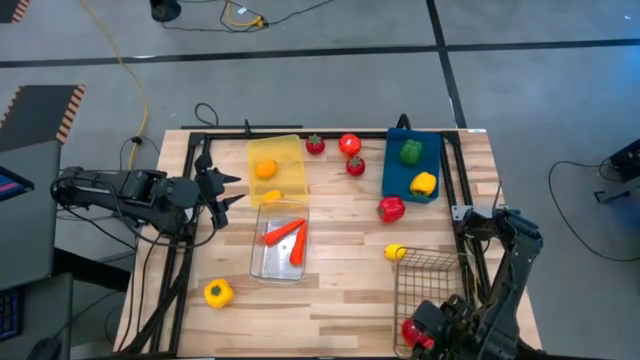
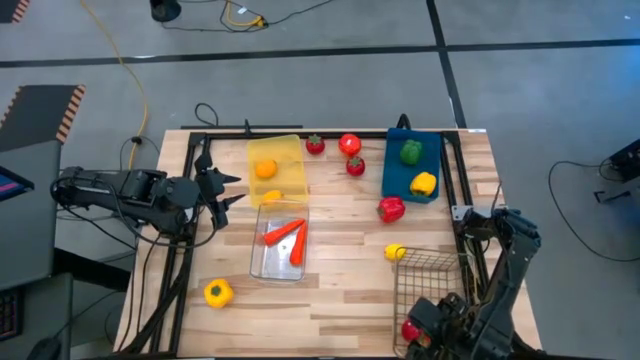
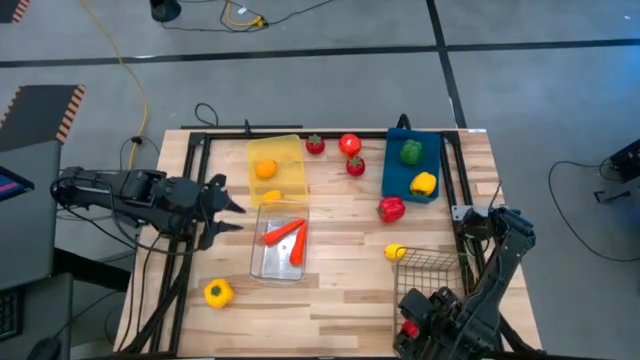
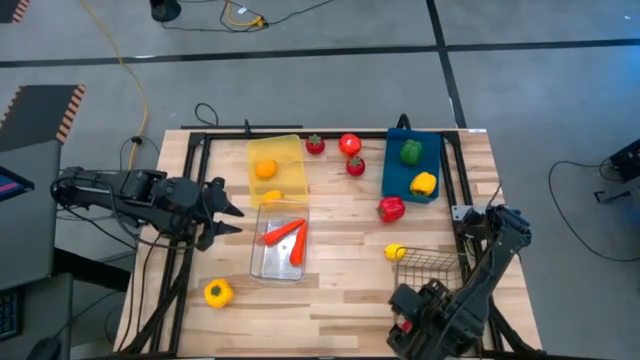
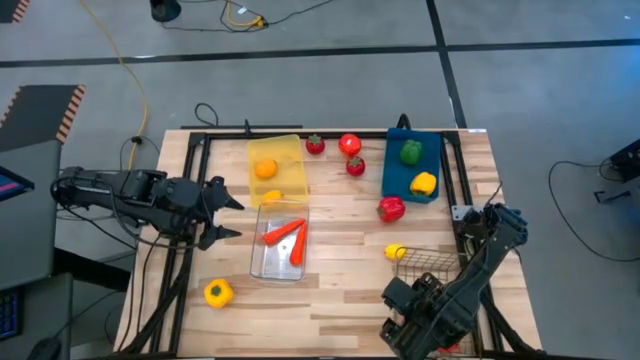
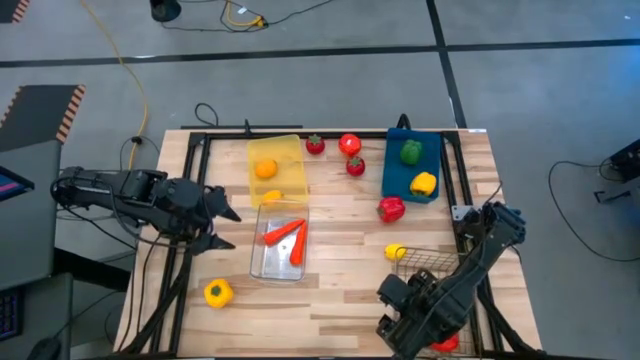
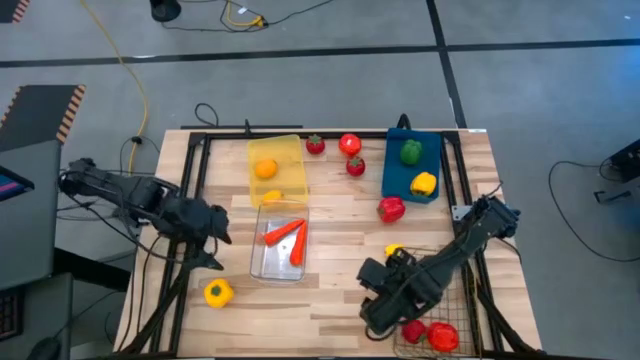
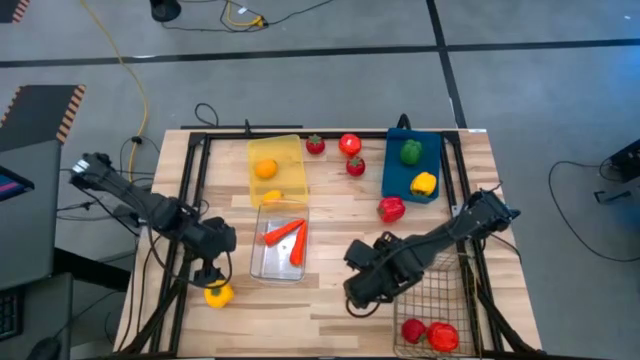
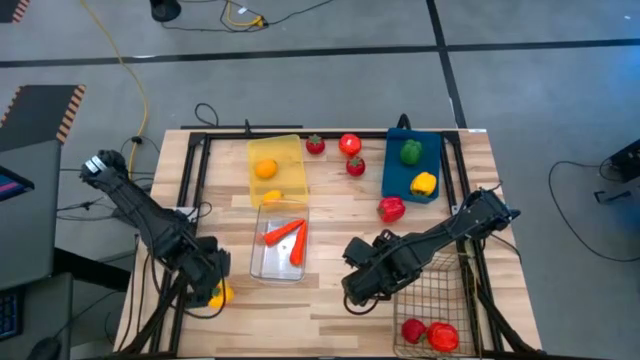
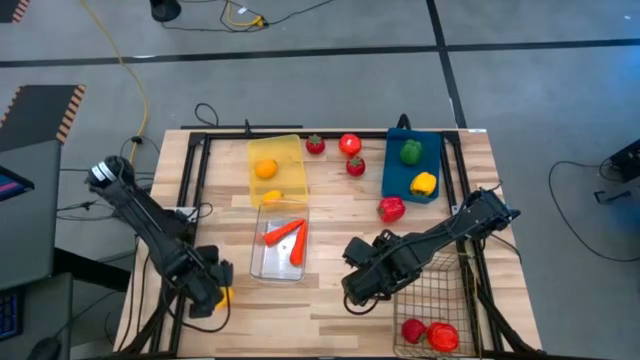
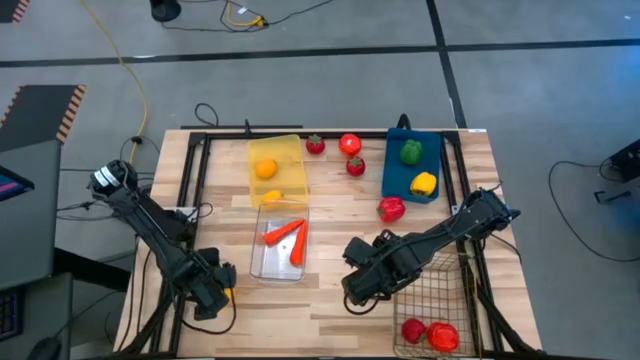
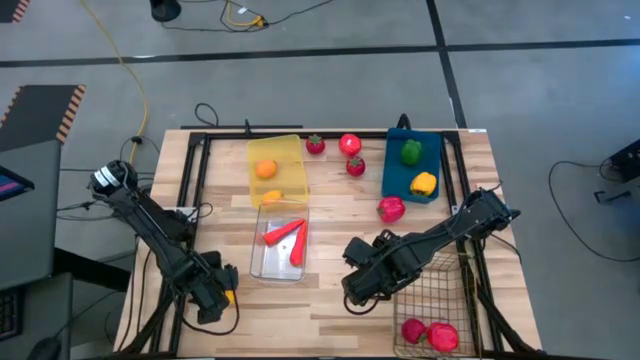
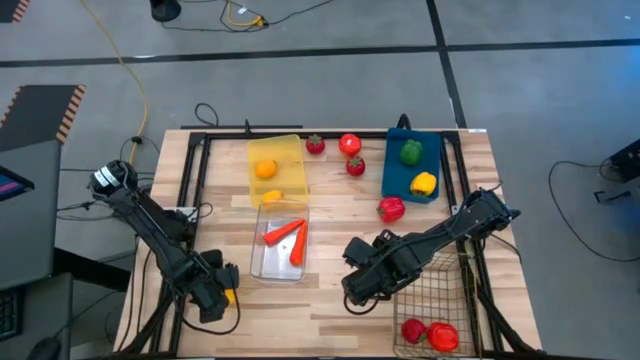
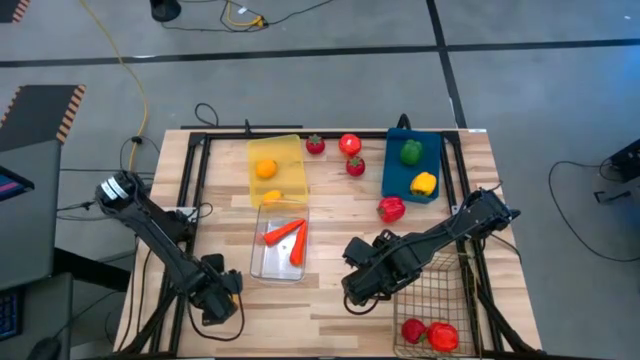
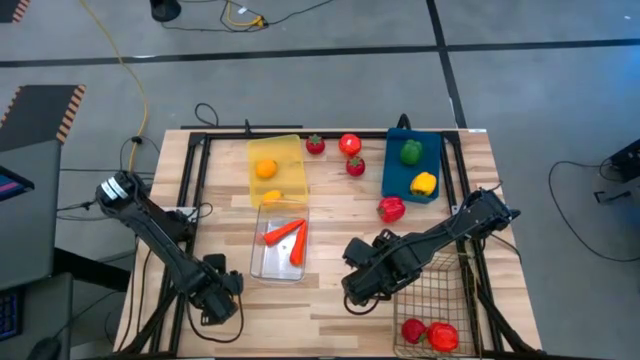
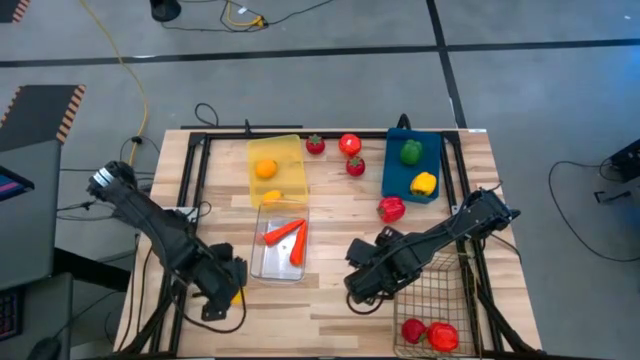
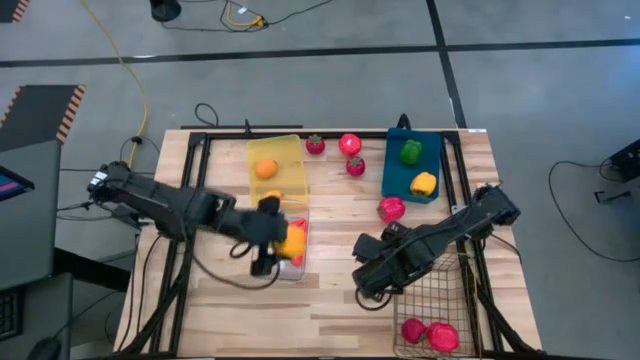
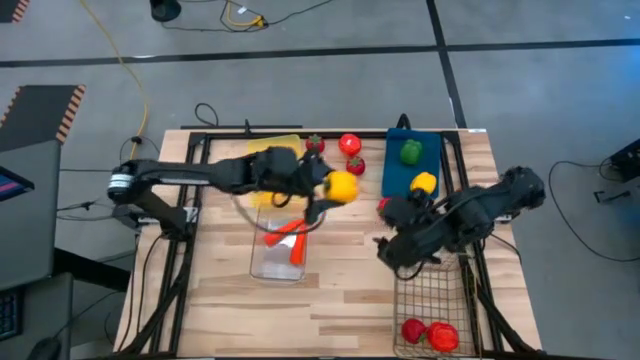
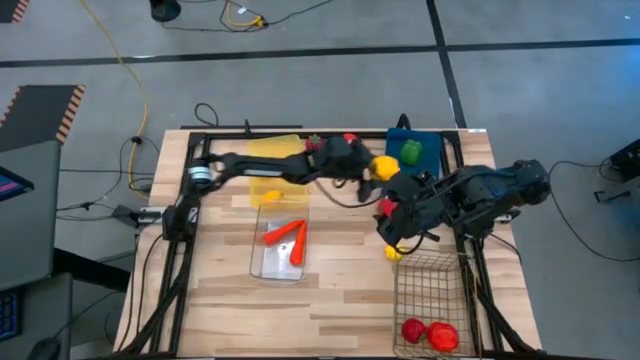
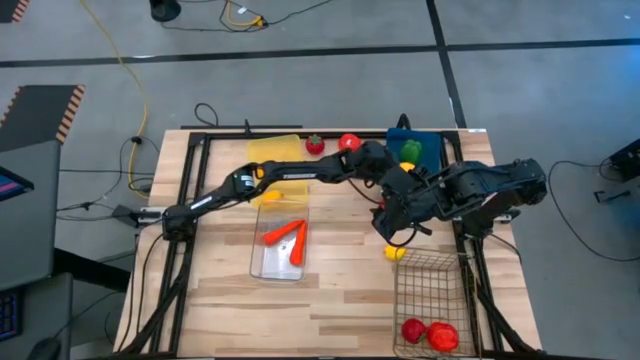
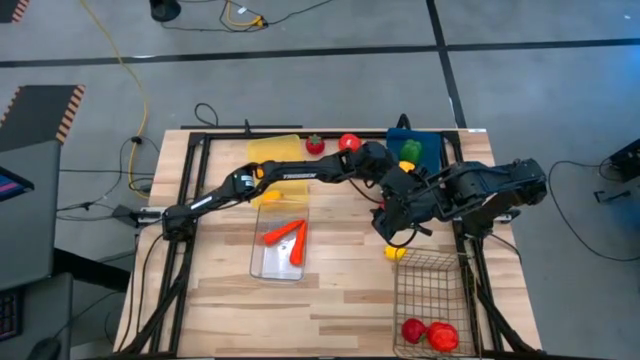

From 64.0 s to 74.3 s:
Task: Sort produce into baskets
Put the yellow bell pepper into the blue bin

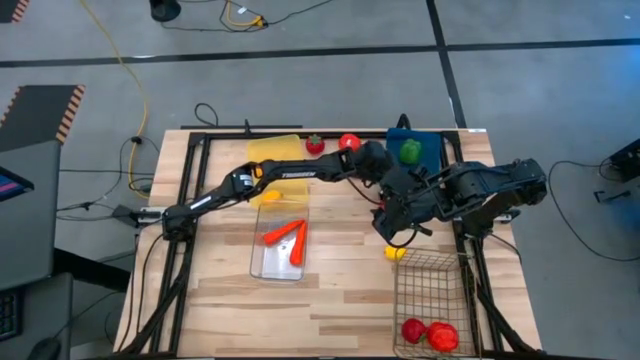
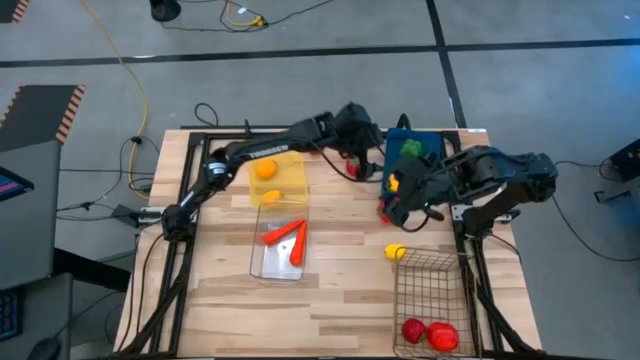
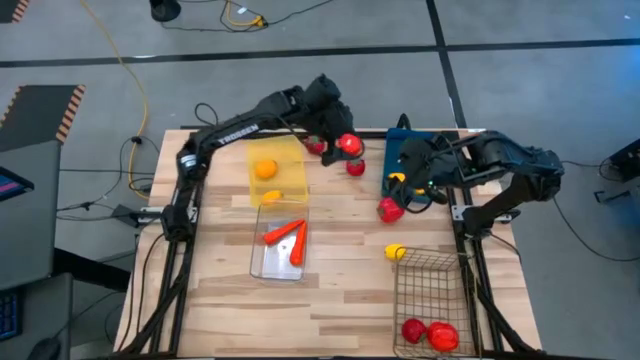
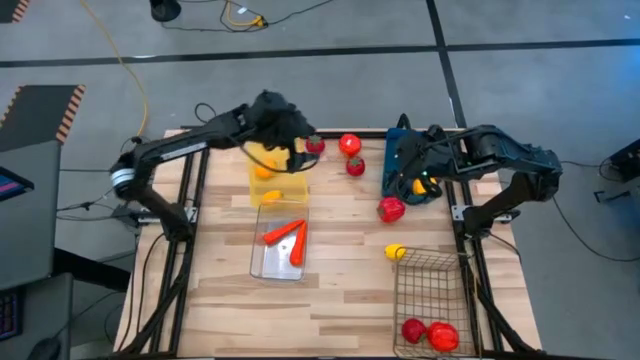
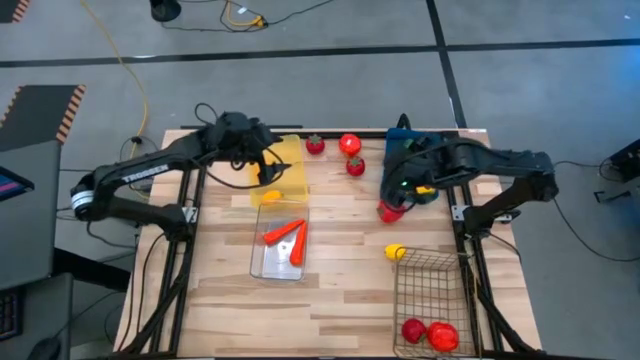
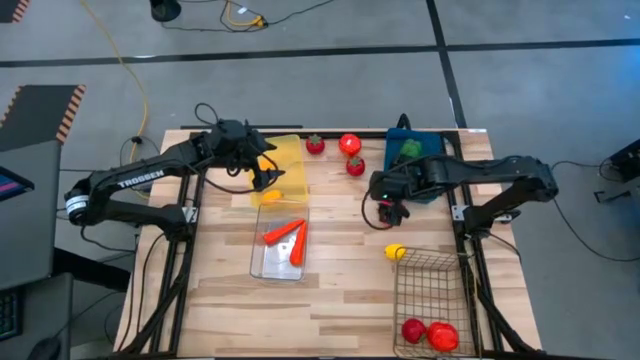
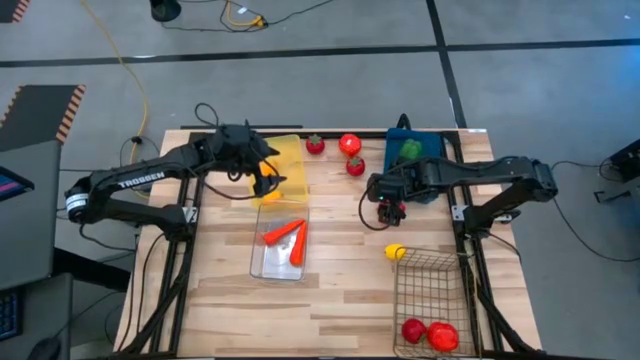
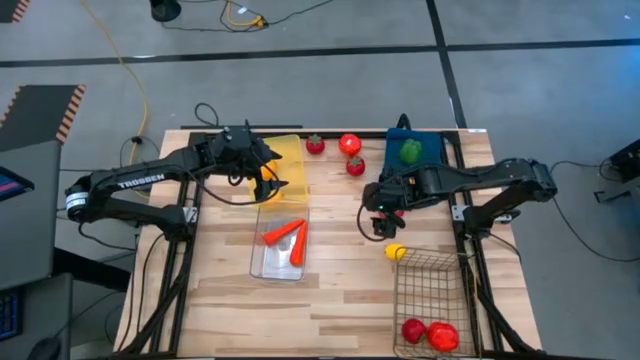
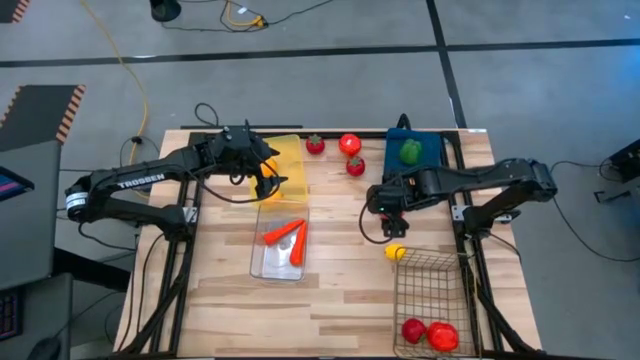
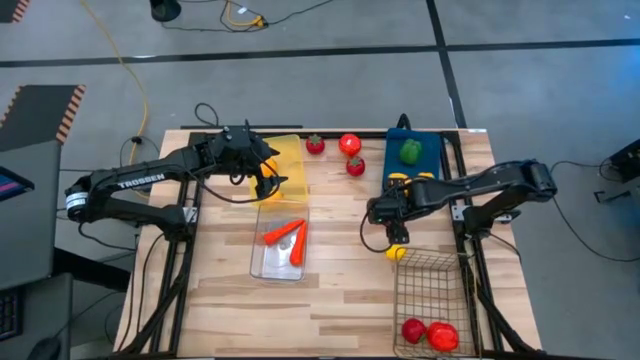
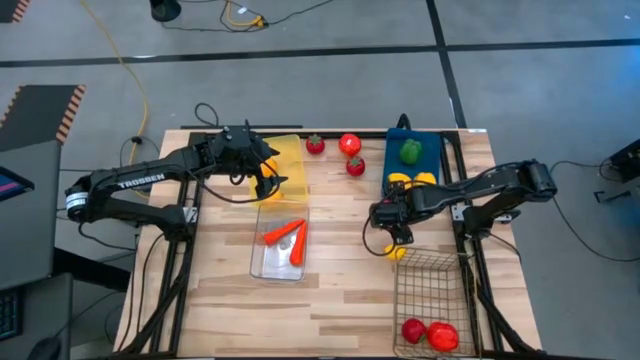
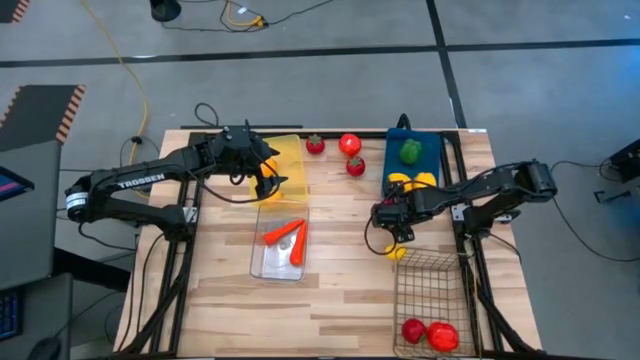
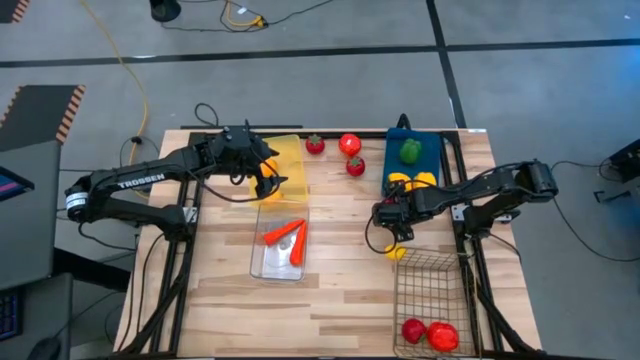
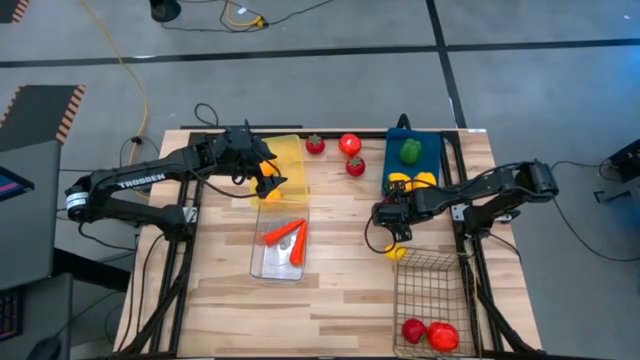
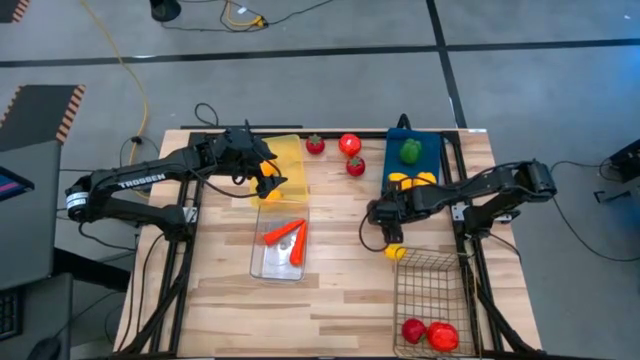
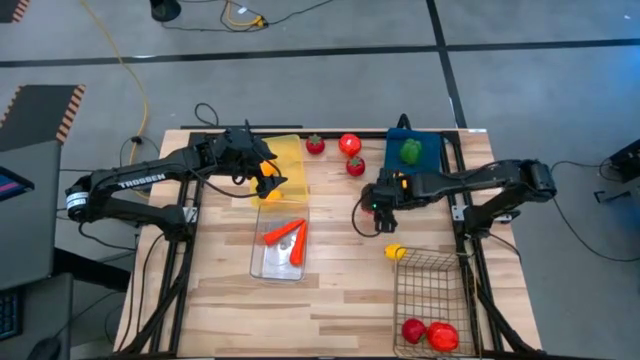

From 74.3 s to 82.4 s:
Put the red bell pepper into the blue bin

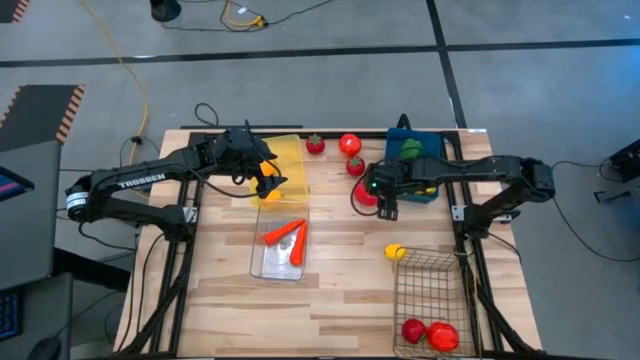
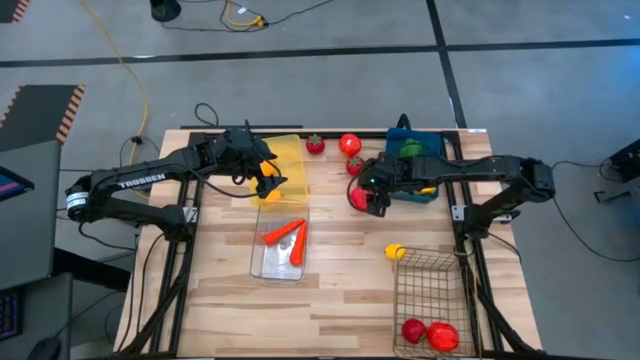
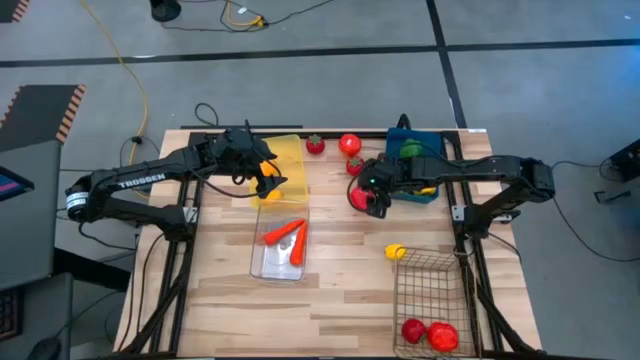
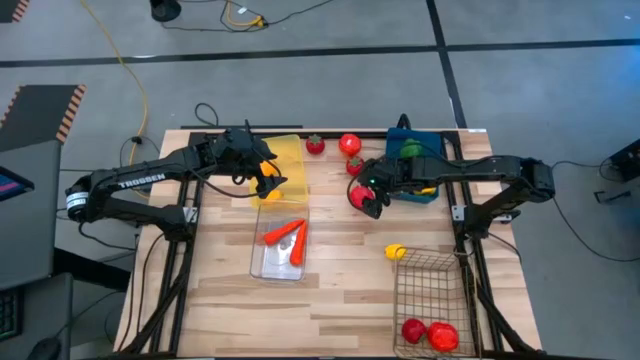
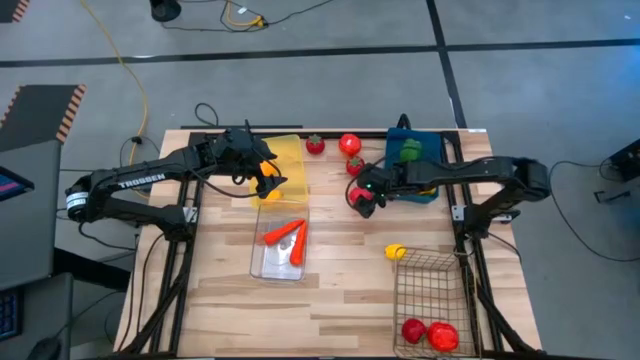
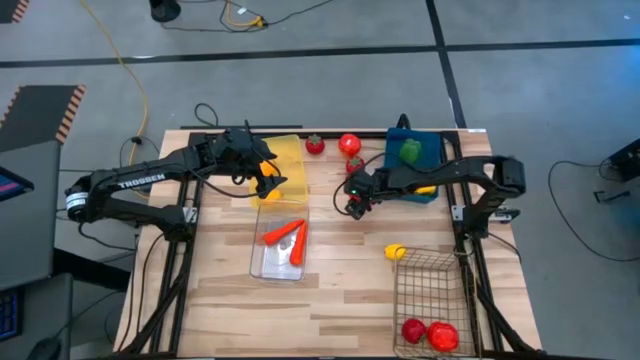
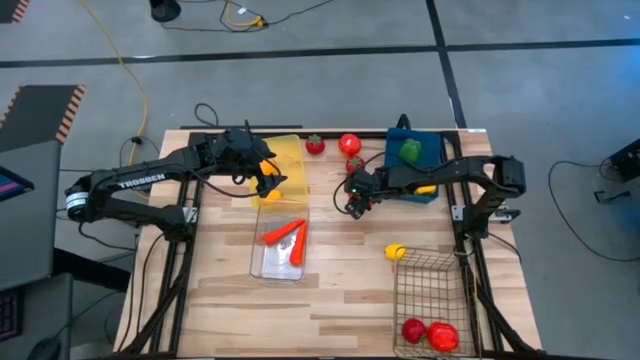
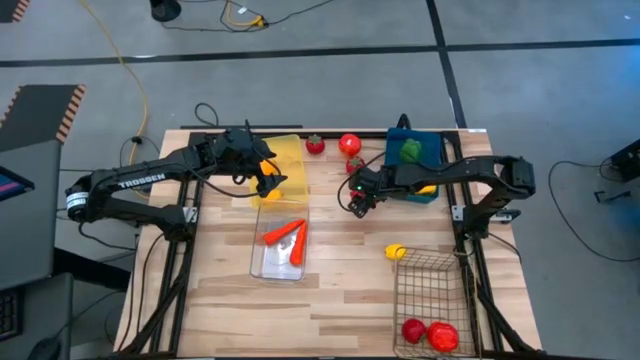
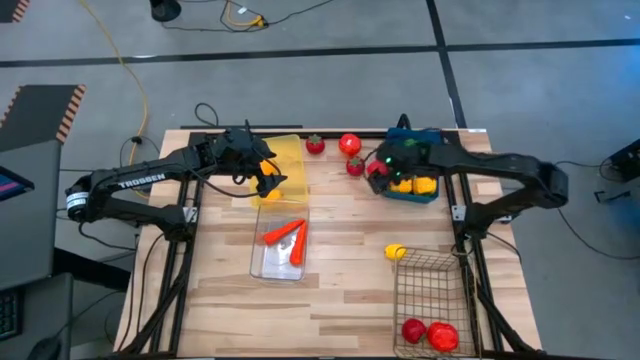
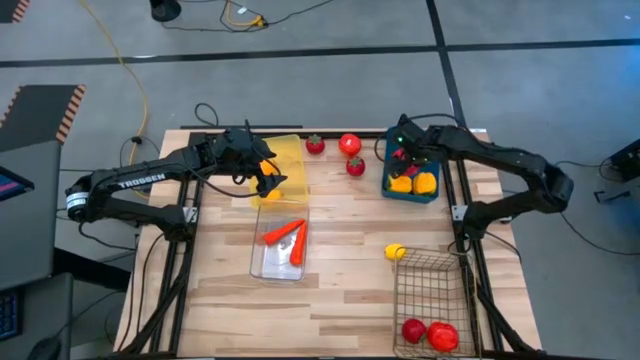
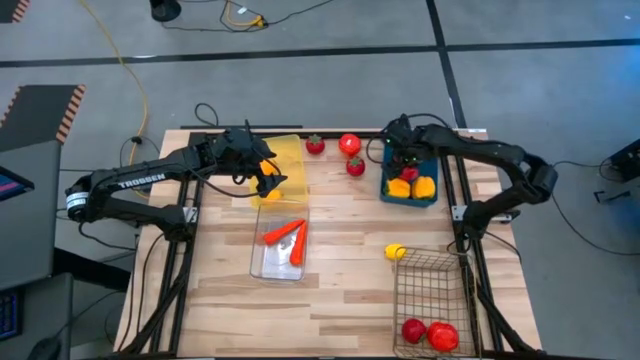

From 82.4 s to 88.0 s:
Put the red bell pepper into the blue bin
